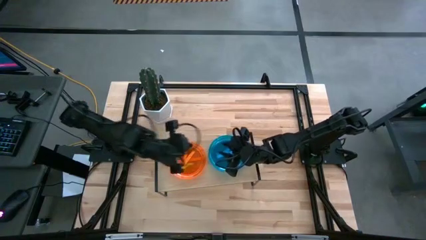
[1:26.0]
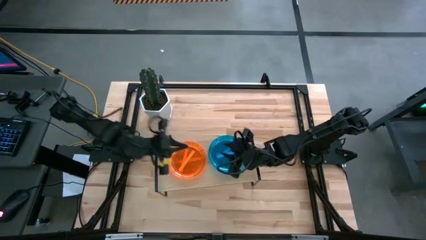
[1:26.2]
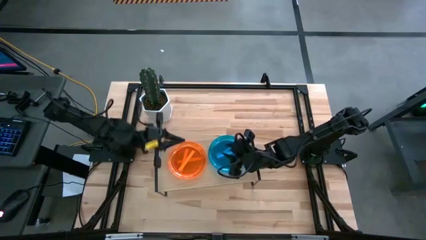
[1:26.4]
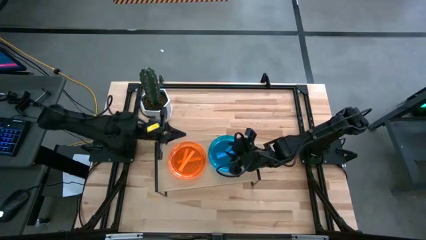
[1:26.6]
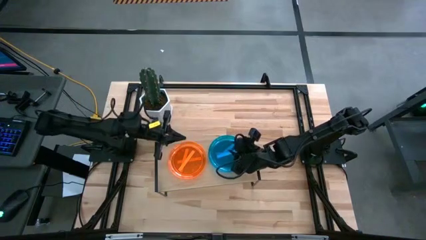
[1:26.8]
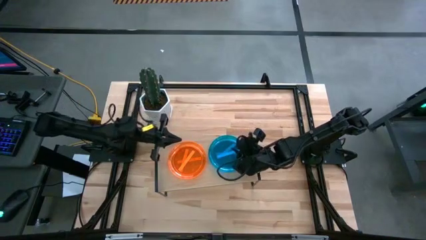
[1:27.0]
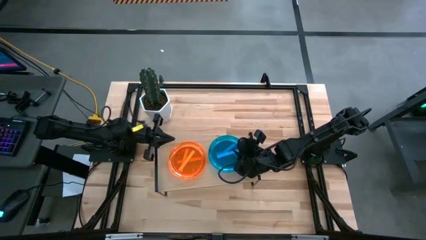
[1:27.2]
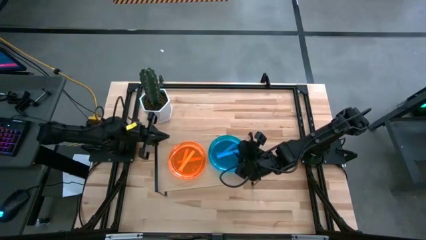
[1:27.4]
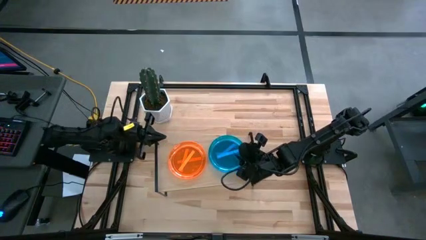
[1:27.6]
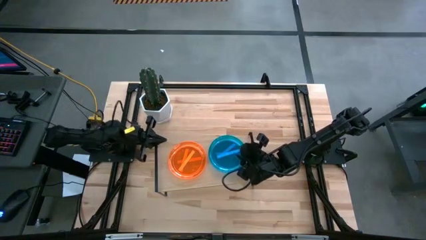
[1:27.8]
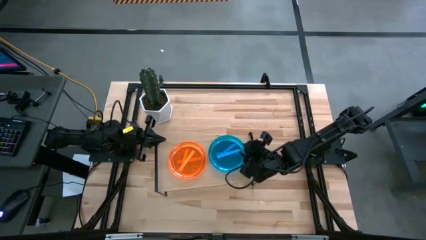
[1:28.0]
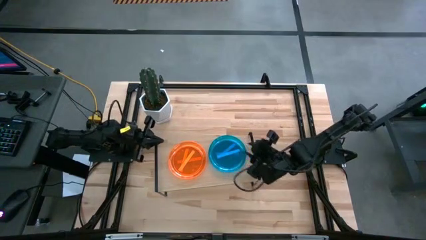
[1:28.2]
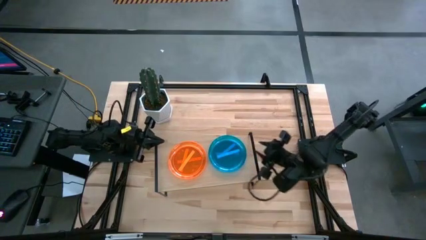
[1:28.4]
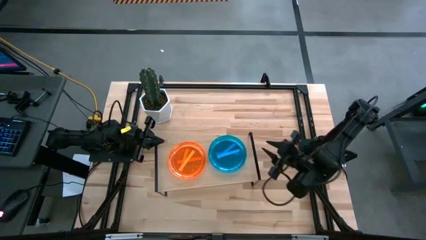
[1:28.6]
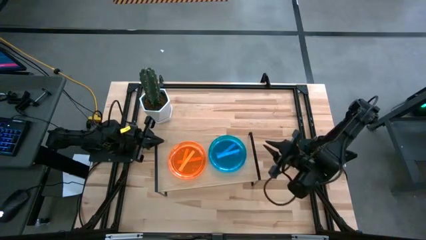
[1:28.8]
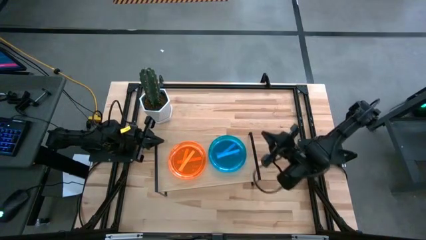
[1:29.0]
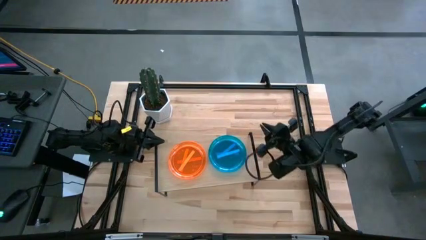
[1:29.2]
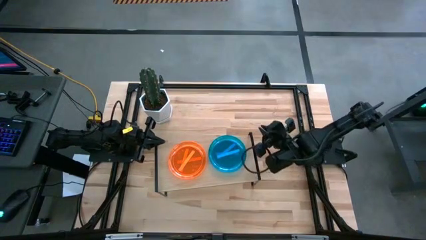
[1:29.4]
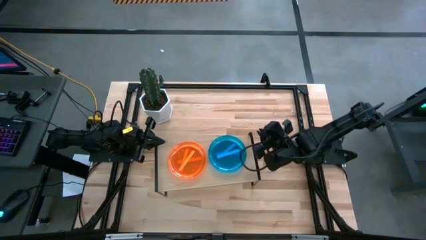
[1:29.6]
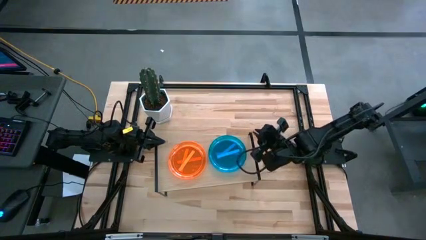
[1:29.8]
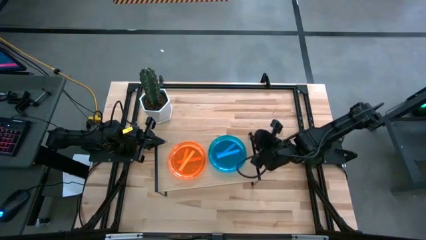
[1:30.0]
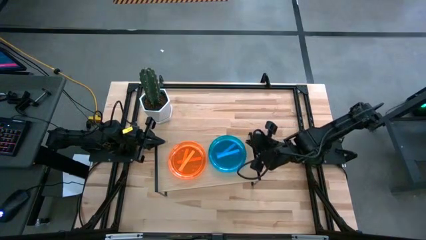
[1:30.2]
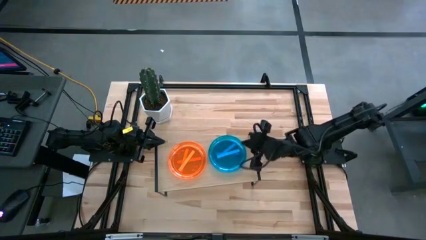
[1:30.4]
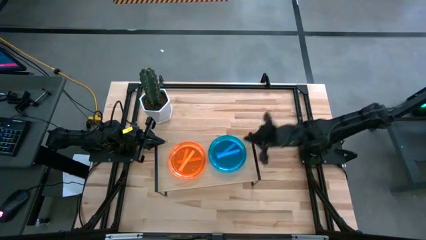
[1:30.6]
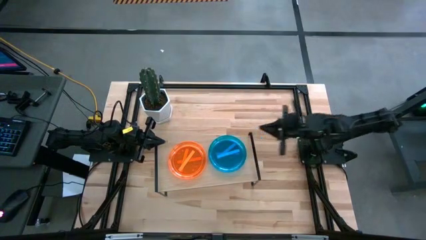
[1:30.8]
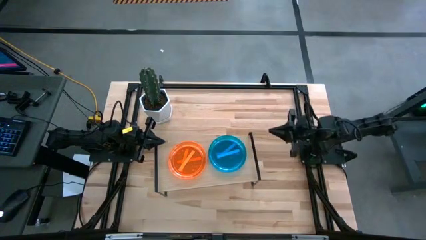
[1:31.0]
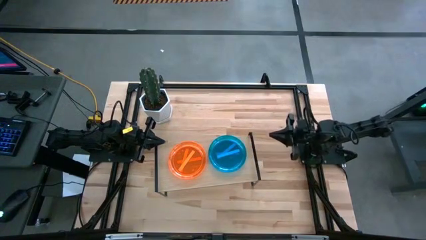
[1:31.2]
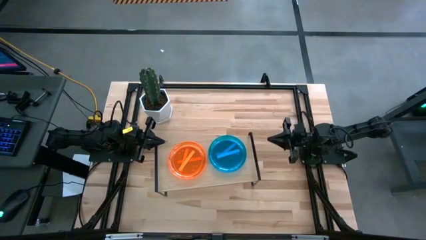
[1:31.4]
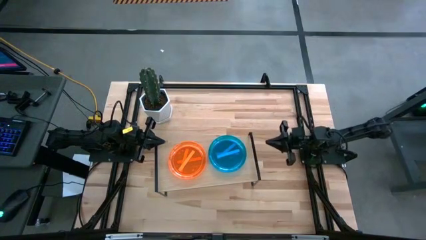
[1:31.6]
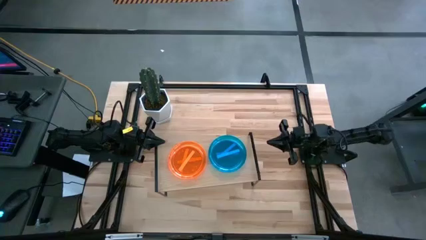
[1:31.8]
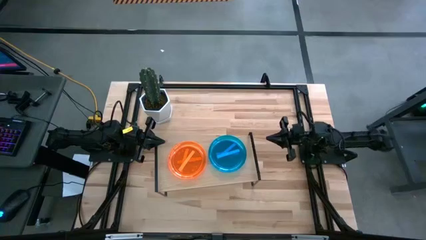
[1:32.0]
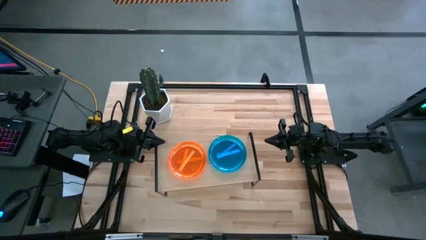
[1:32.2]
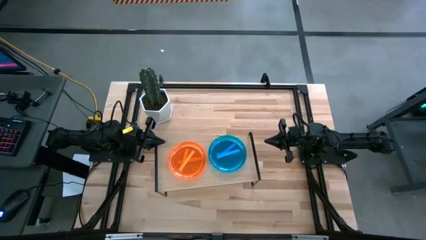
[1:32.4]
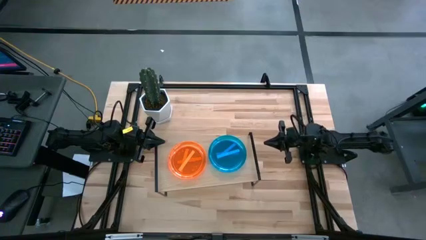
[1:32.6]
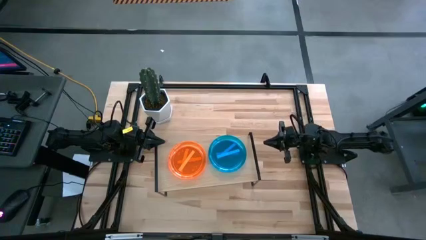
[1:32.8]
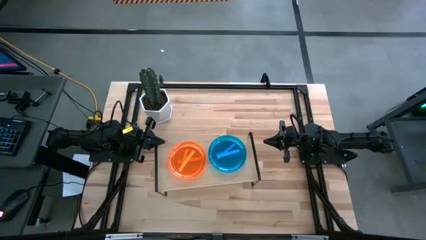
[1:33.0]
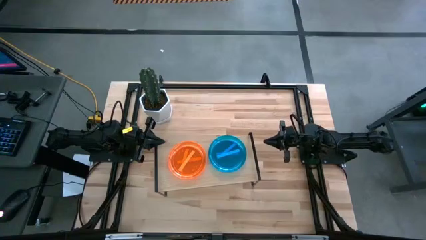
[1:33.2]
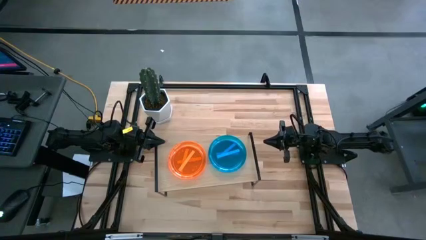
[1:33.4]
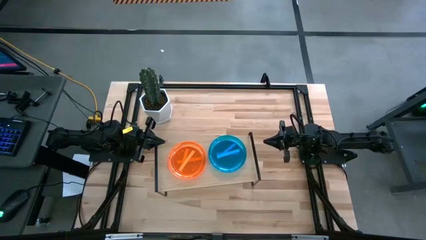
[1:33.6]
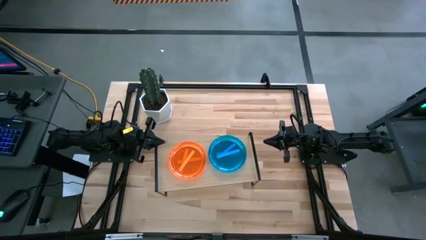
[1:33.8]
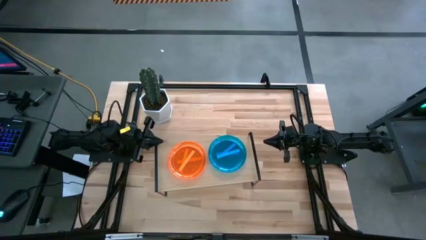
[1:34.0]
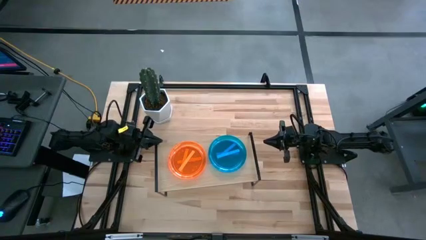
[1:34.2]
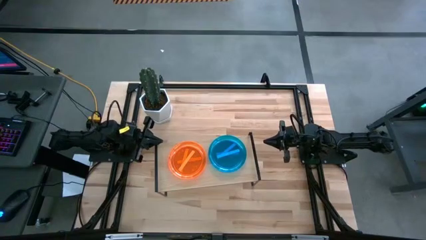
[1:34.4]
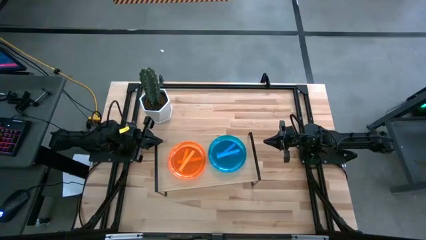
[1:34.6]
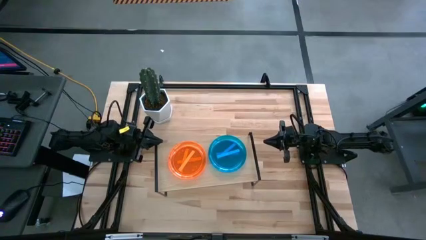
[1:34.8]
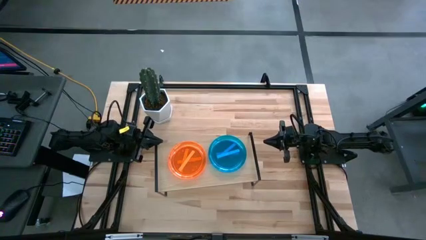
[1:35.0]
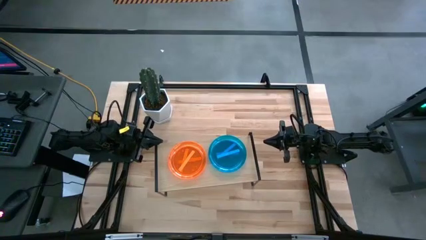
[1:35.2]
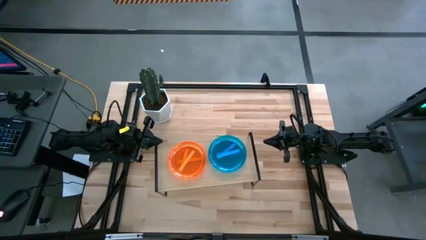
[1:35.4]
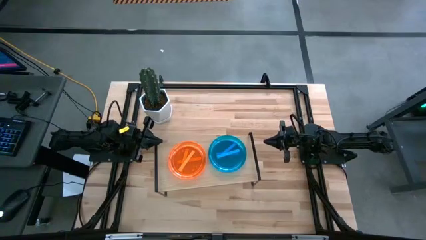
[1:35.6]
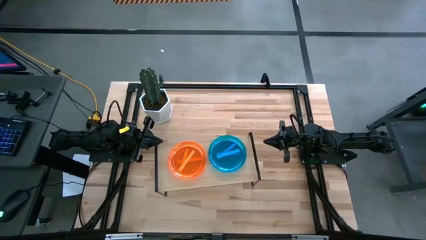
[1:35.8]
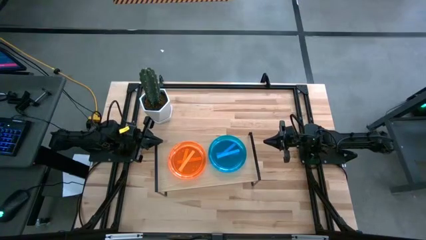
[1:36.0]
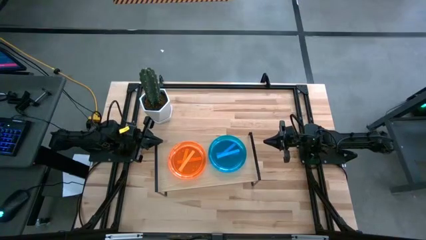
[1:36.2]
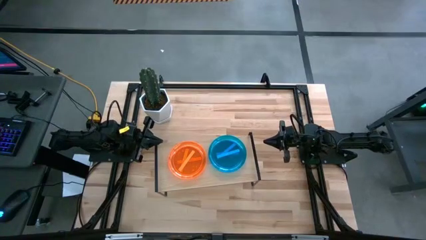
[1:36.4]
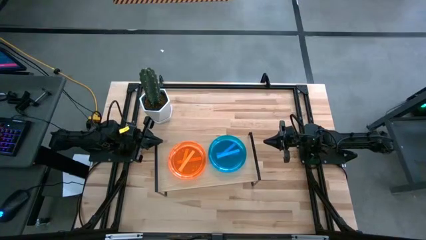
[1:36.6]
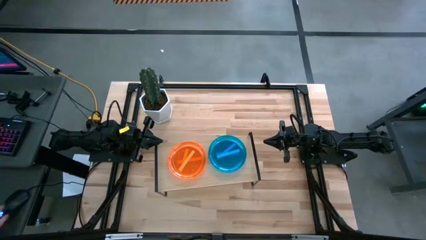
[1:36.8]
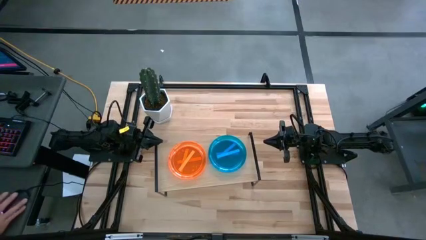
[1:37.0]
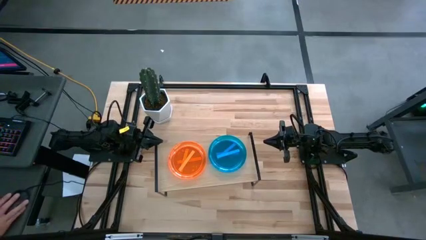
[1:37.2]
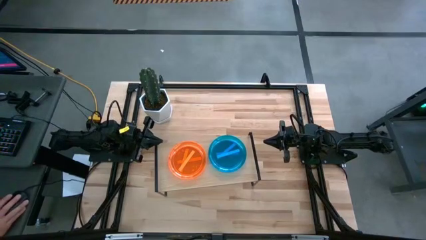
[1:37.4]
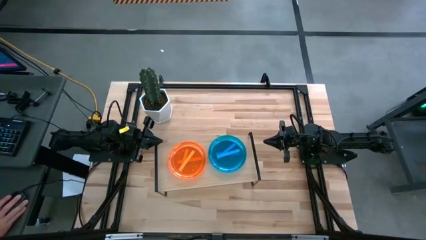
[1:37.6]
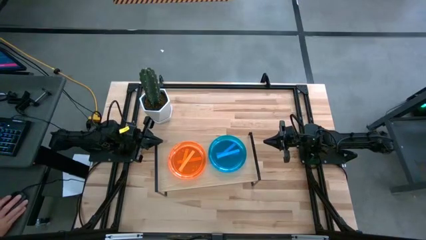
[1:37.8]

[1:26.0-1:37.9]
Task: Place and stack plates onto a shelf
Return to Home Position
